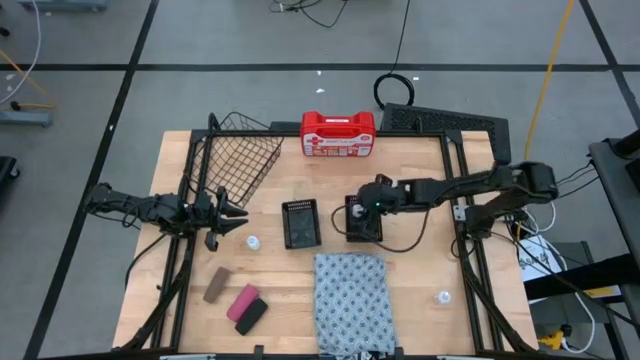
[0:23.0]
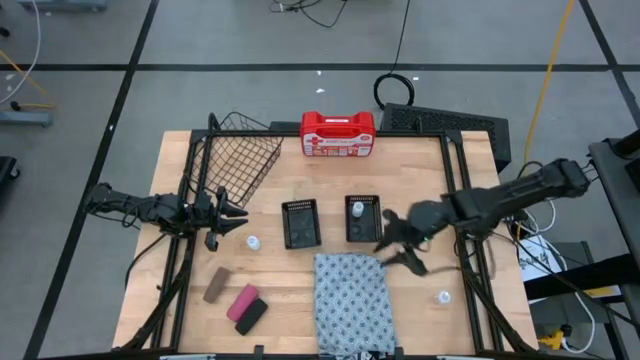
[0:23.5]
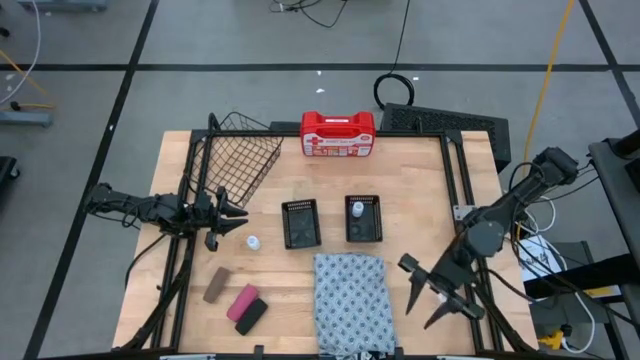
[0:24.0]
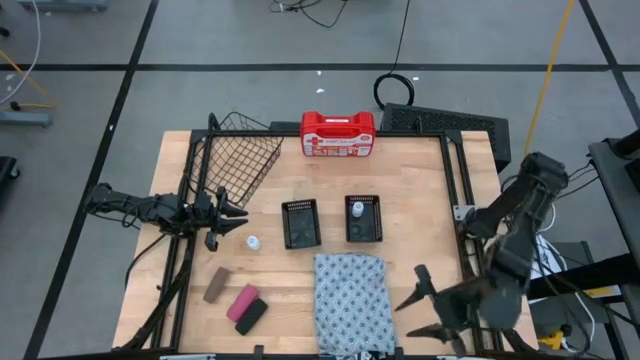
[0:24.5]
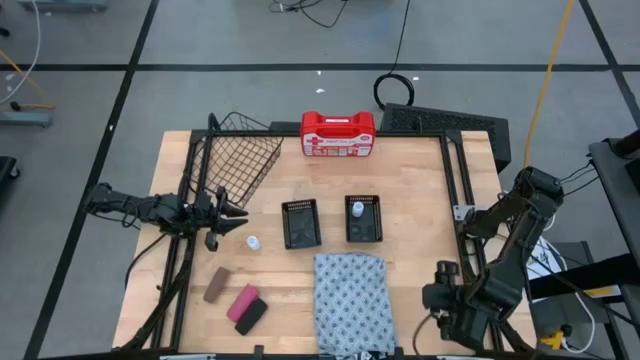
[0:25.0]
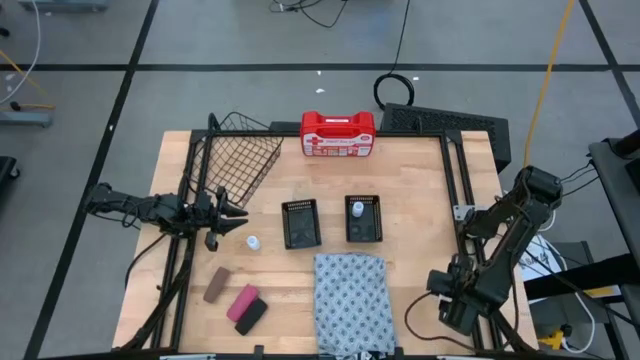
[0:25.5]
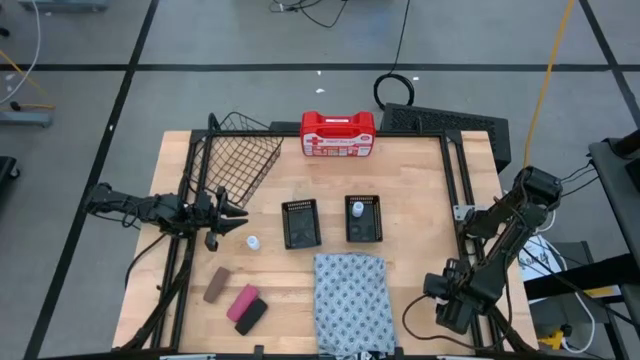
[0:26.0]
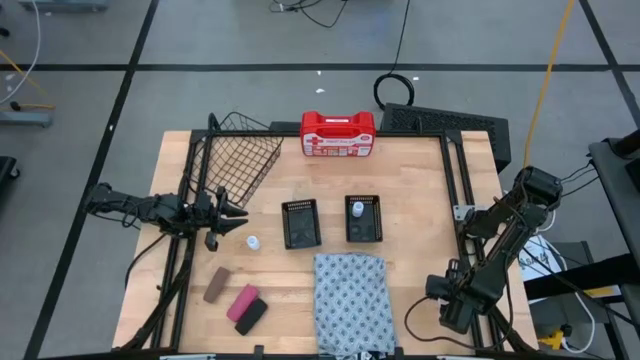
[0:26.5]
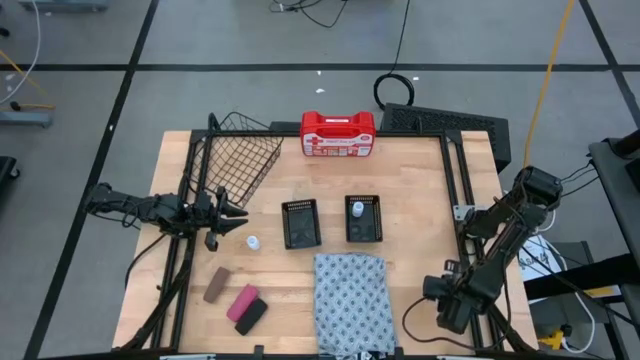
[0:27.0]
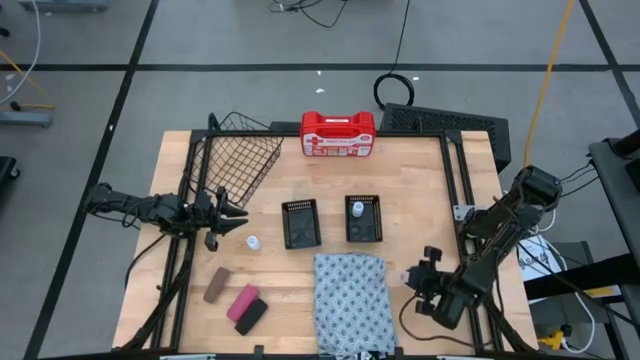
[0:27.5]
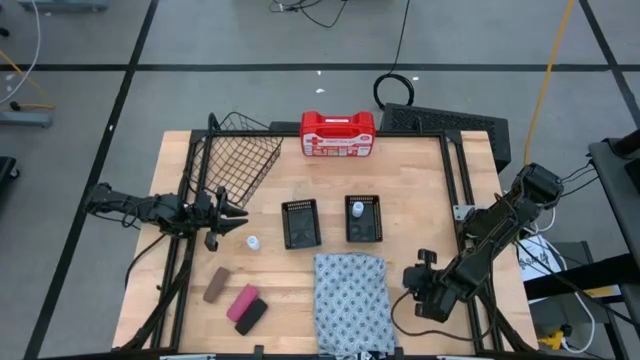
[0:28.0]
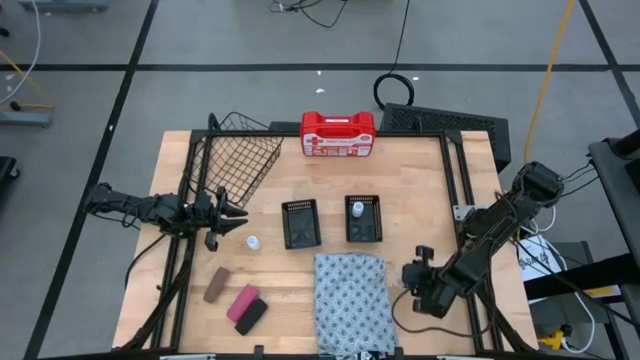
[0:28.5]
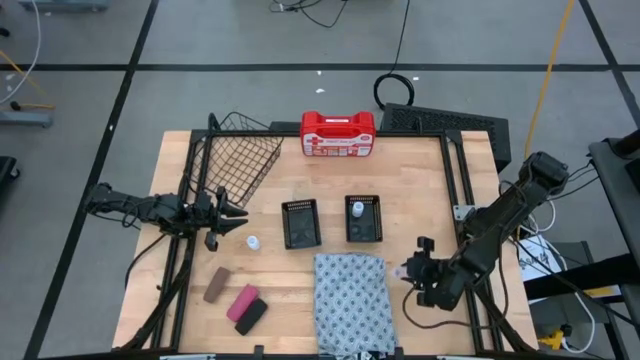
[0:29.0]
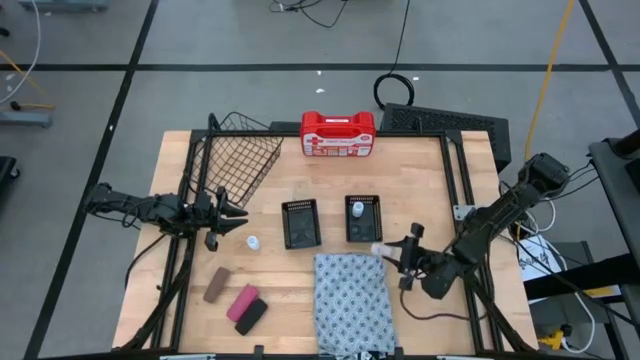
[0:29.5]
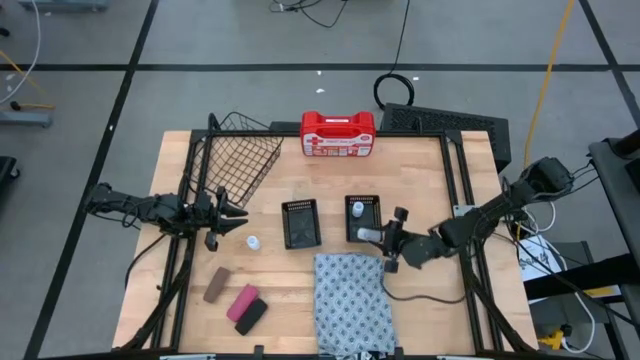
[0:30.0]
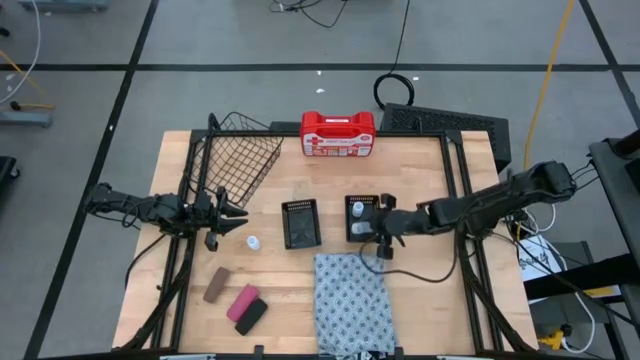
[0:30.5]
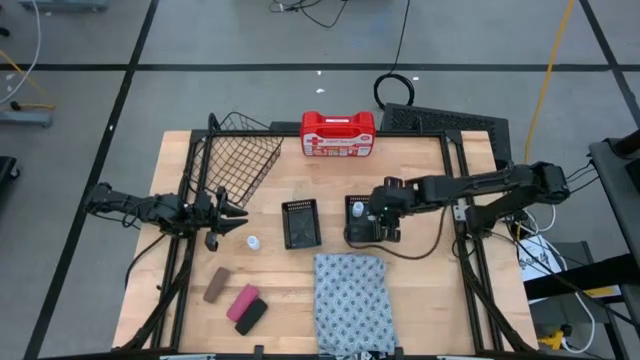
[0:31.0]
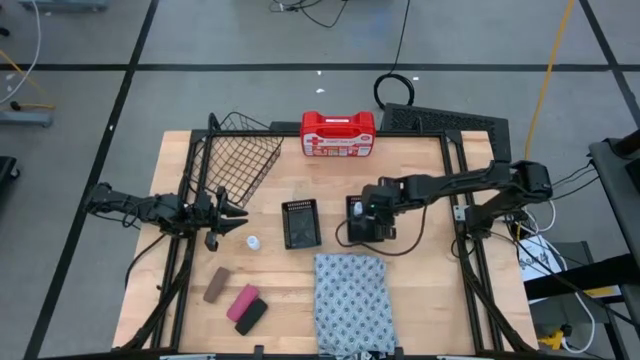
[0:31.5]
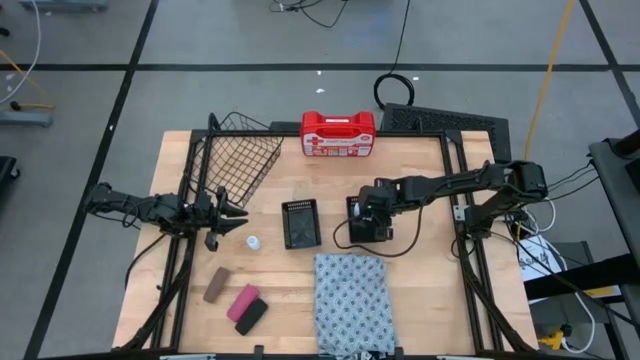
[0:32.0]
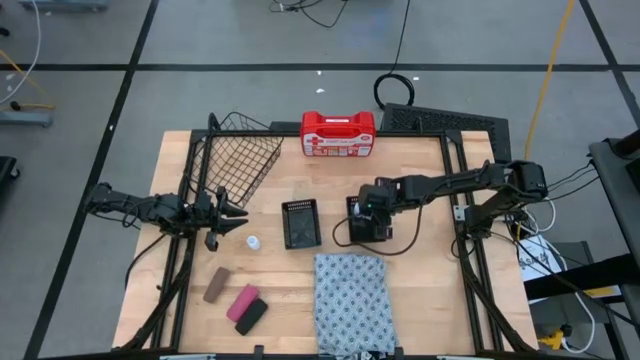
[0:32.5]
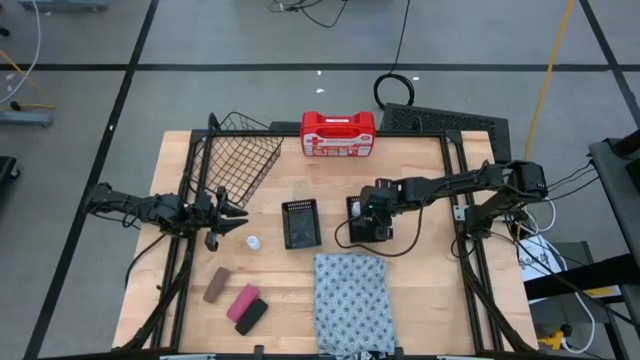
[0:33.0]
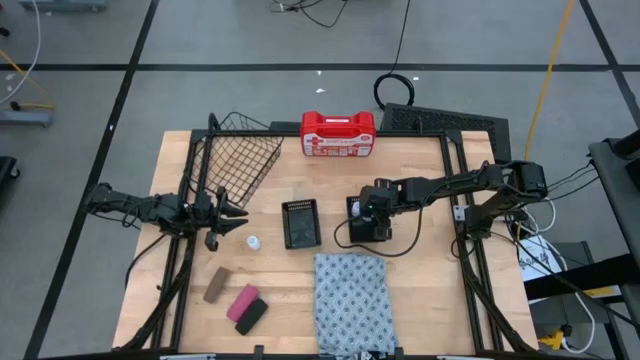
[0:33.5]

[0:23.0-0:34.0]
Task: Pick & Place Medicine items
Put the right white pill bottle into the right black basket

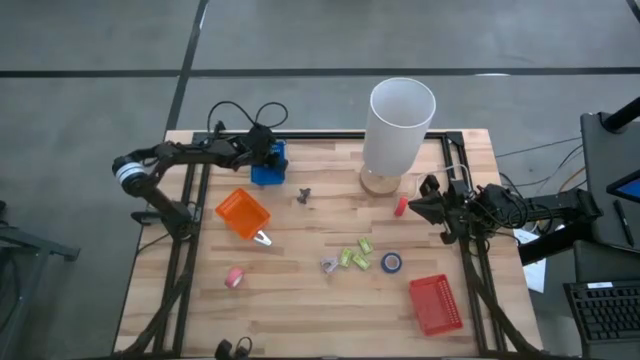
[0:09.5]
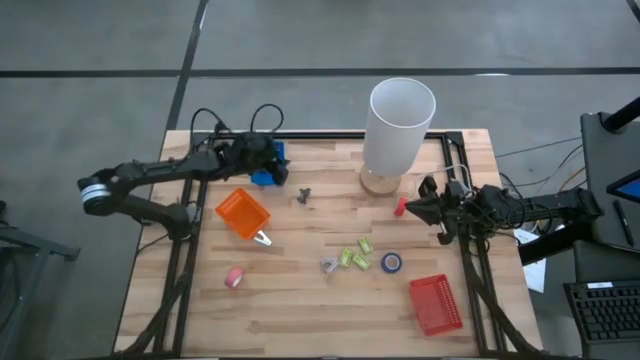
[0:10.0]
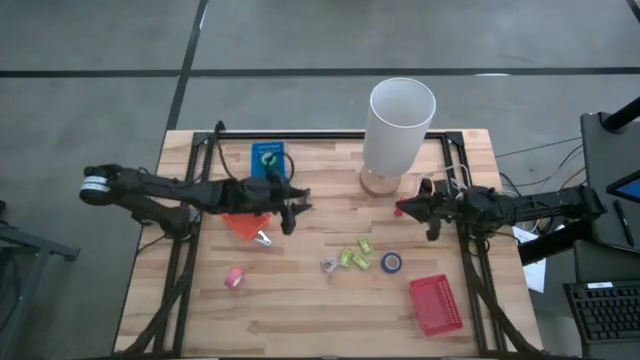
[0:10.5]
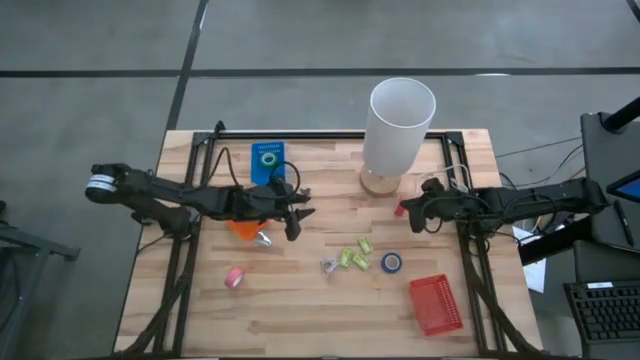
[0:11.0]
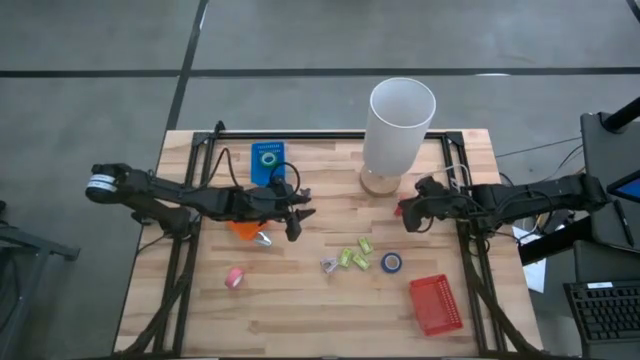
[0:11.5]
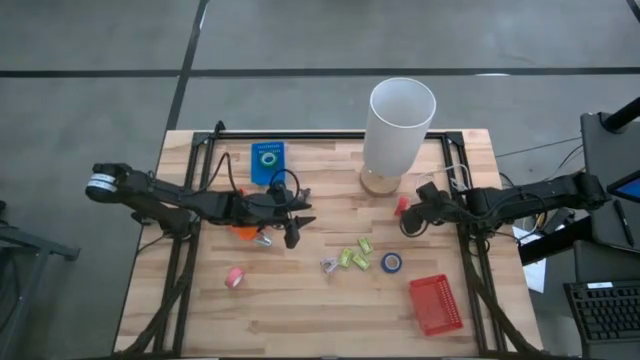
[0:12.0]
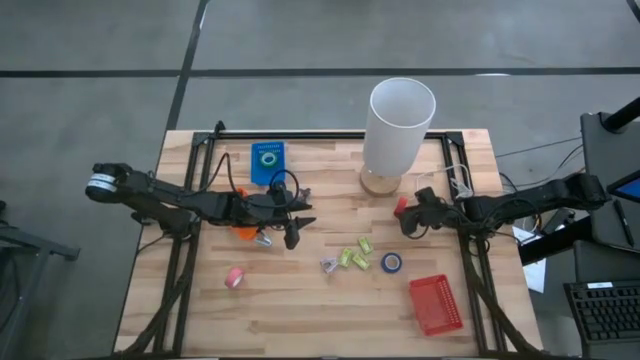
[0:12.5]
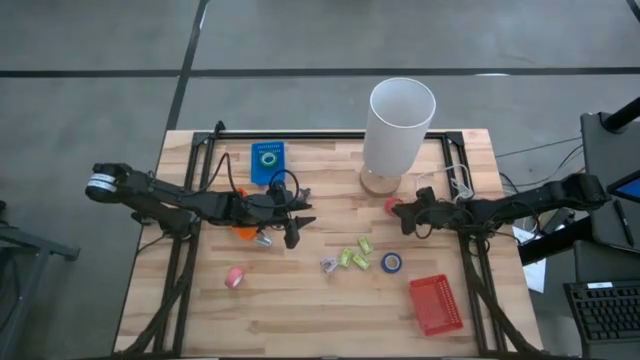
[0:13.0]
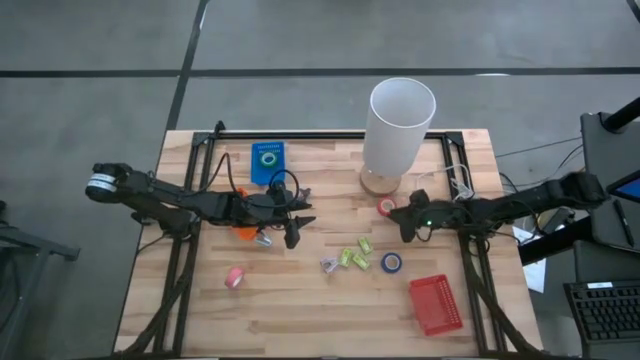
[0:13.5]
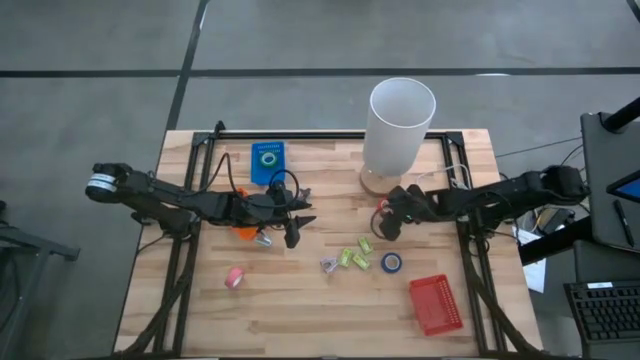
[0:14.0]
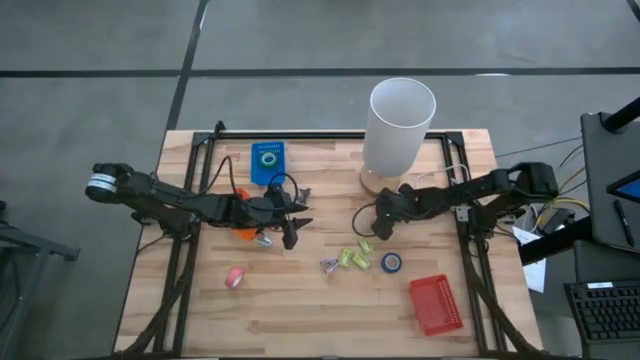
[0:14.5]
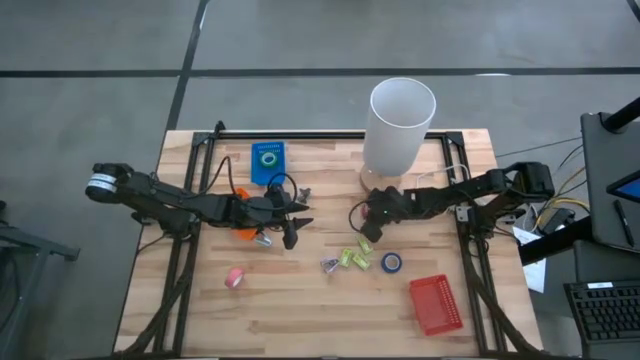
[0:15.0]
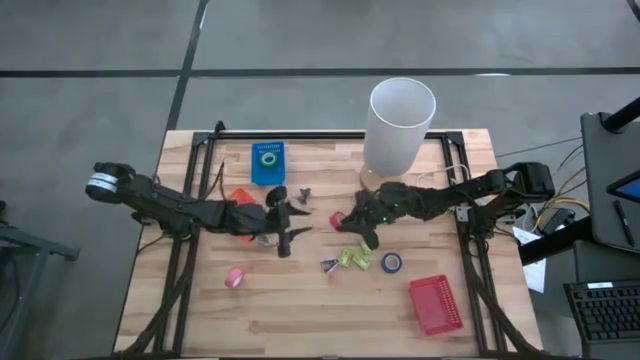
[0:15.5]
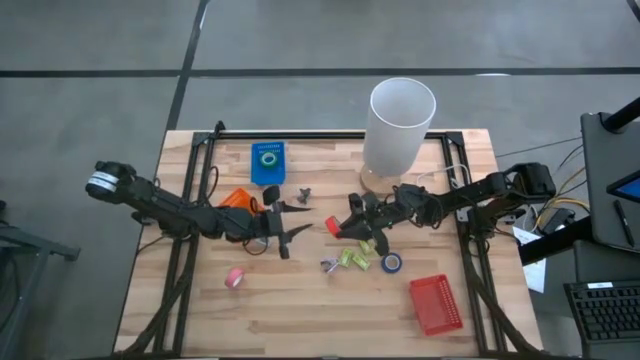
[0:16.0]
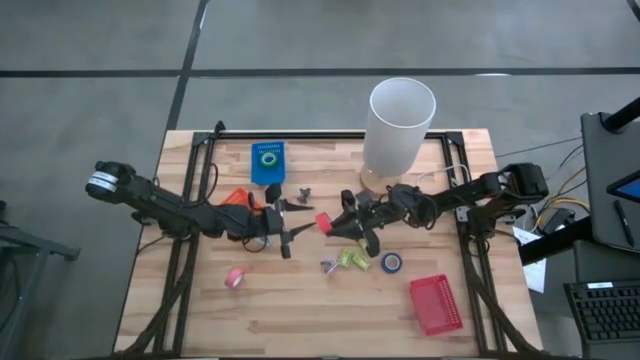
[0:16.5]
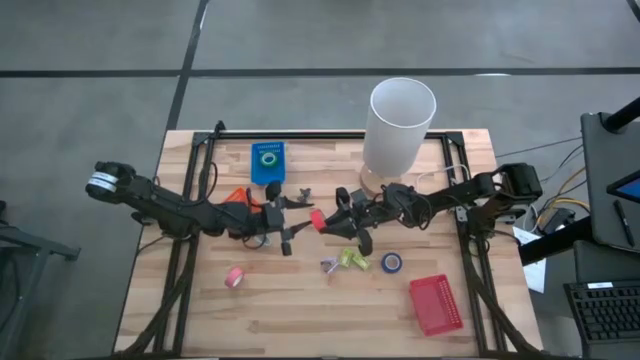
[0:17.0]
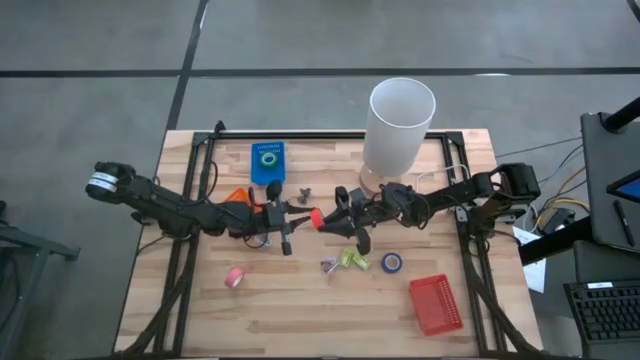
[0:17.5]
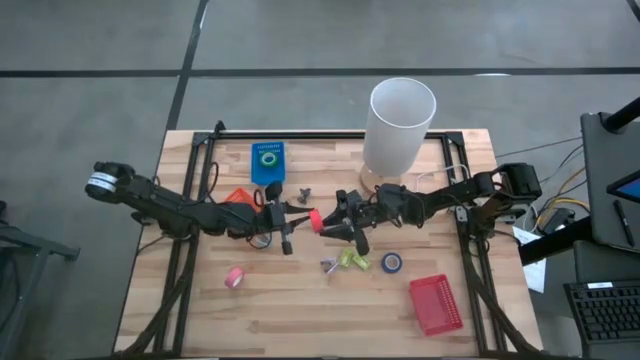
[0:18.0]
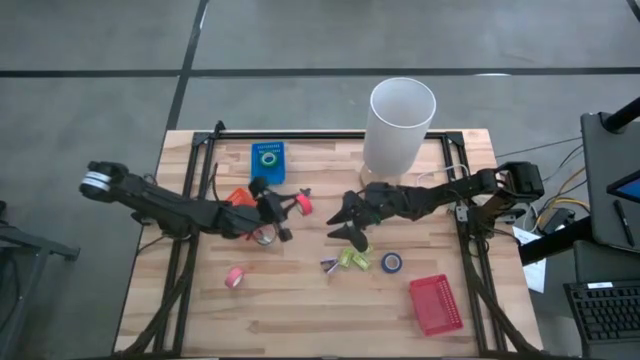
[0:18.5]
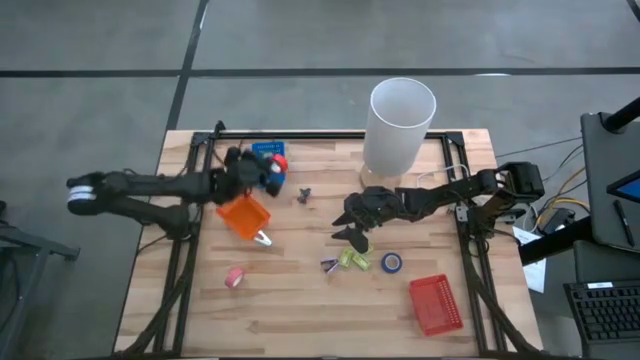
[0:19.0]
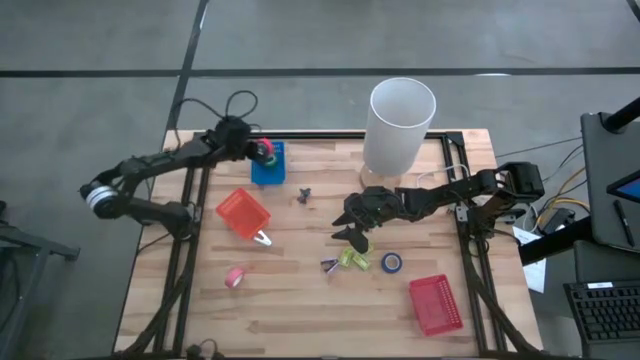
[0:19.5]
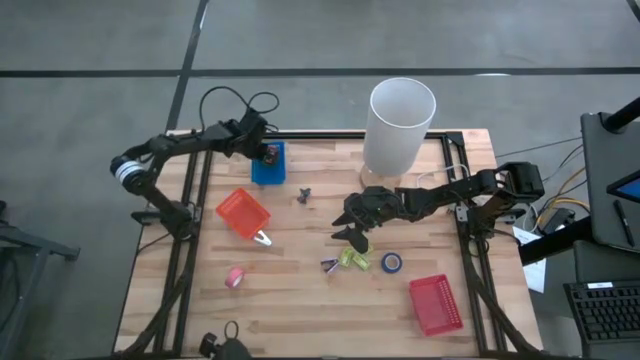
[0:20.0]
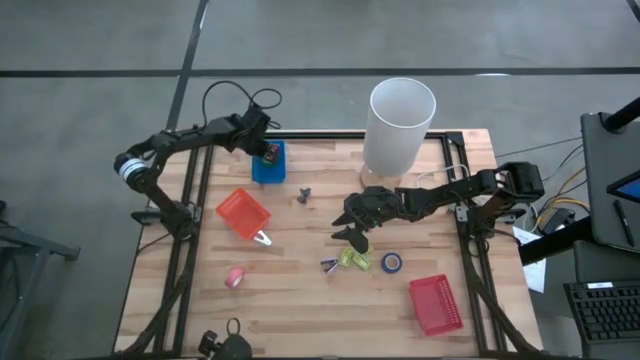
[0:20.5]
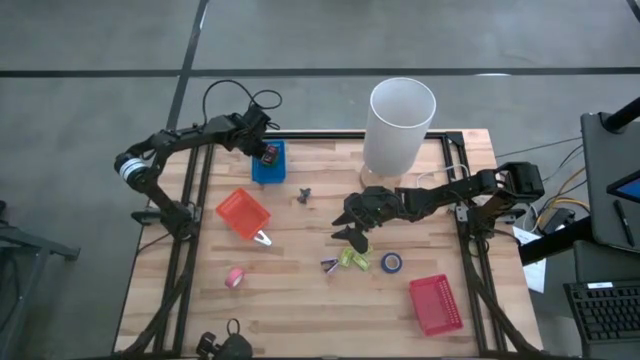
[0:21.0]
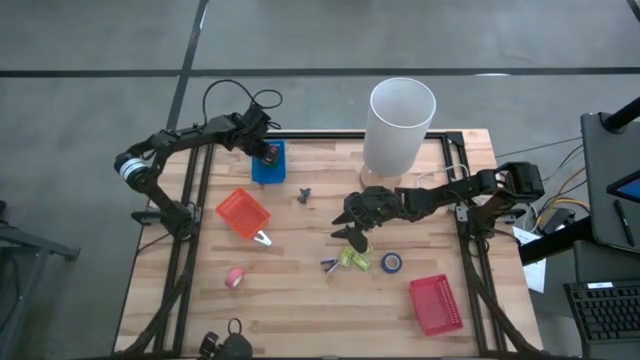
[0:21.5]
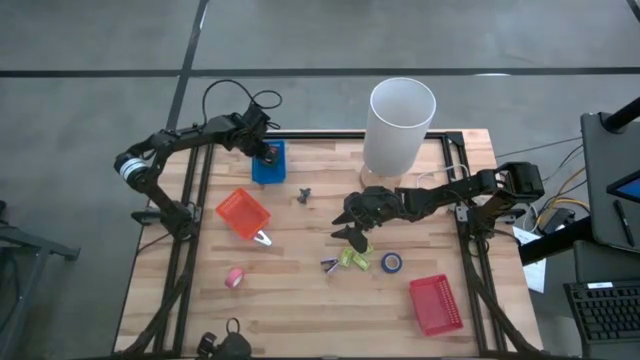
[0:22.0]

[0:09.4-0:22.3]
Task: Pick and place Stapler, Stapler remover, tape
Stack the orange tape on the green tape in the blue bin
